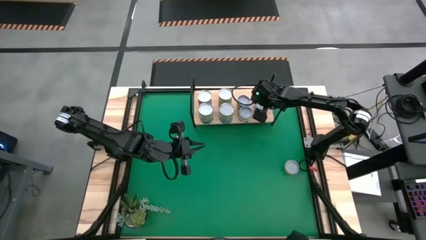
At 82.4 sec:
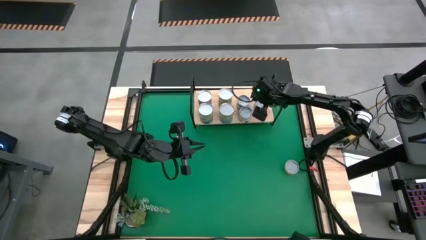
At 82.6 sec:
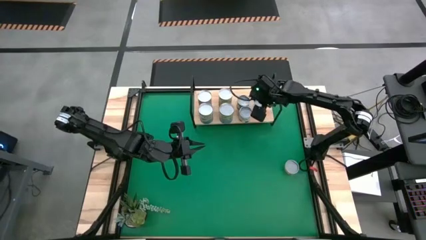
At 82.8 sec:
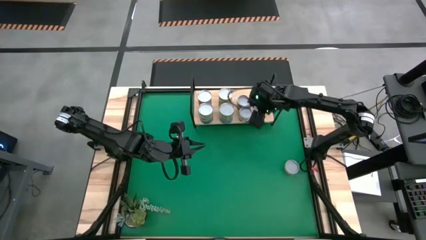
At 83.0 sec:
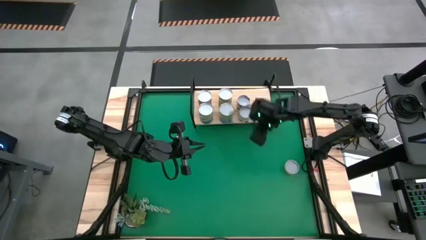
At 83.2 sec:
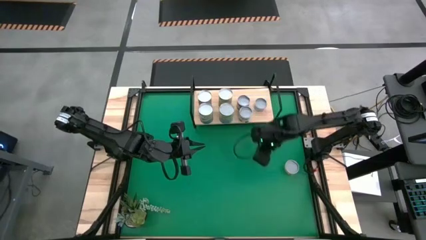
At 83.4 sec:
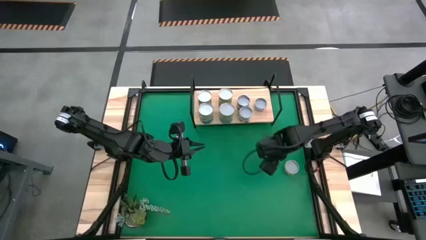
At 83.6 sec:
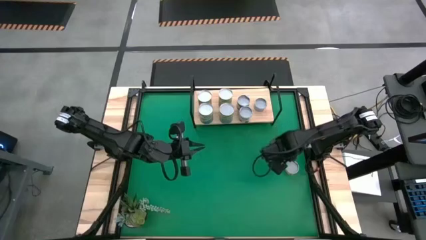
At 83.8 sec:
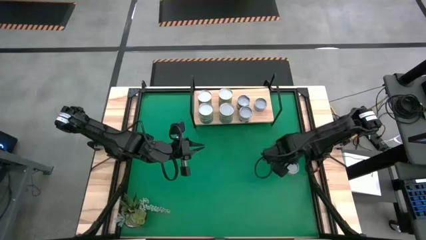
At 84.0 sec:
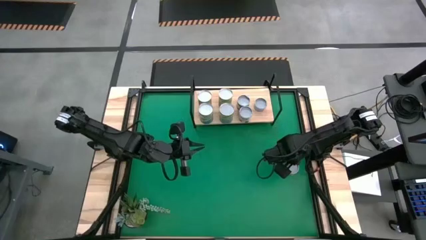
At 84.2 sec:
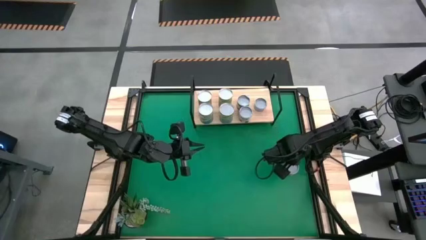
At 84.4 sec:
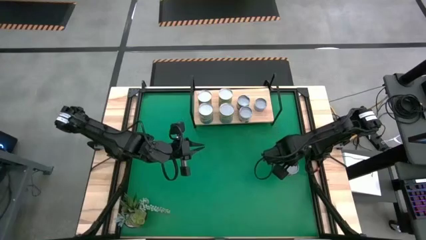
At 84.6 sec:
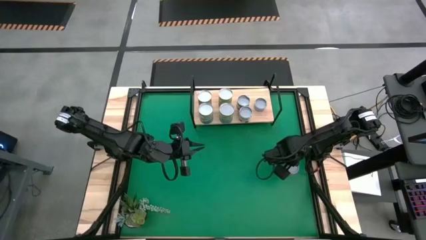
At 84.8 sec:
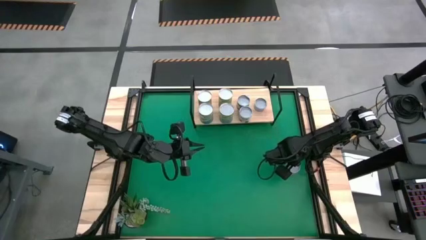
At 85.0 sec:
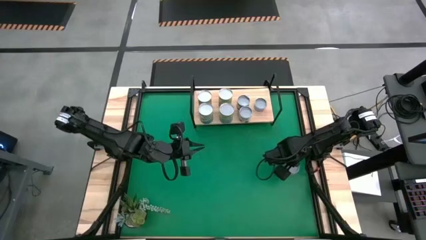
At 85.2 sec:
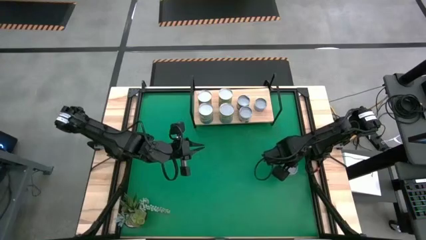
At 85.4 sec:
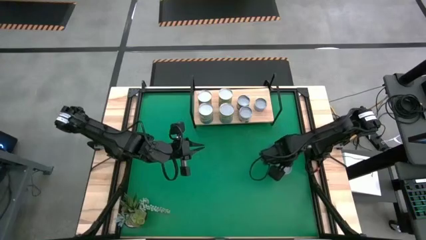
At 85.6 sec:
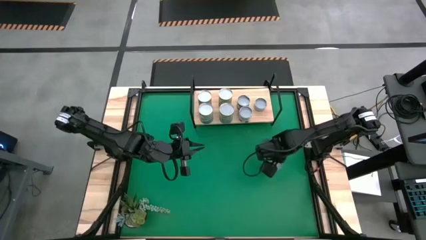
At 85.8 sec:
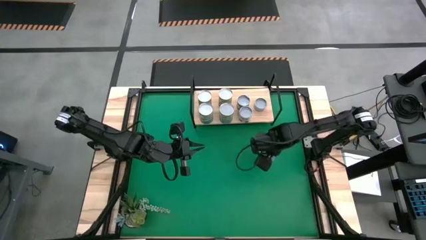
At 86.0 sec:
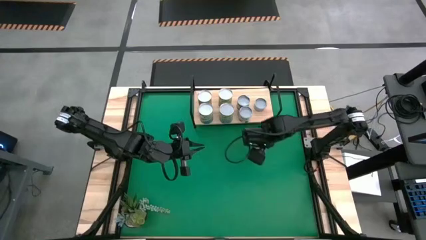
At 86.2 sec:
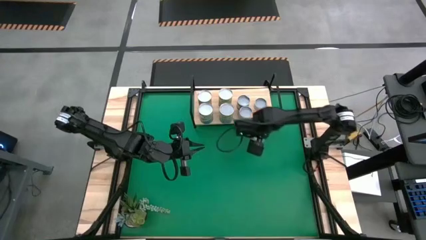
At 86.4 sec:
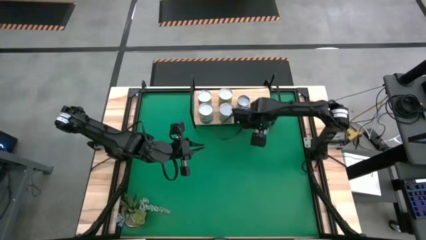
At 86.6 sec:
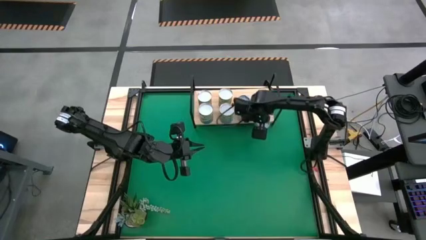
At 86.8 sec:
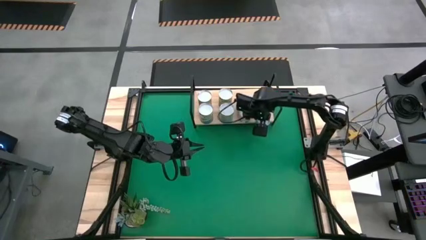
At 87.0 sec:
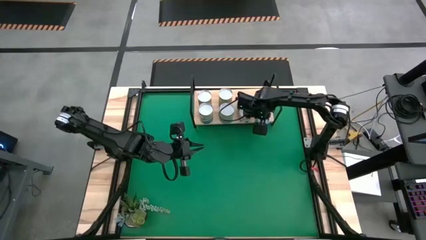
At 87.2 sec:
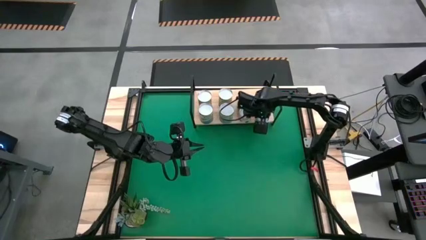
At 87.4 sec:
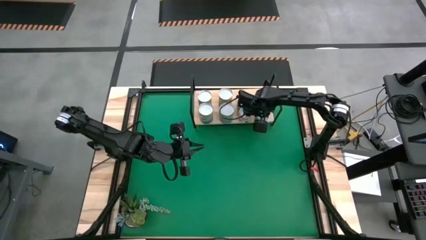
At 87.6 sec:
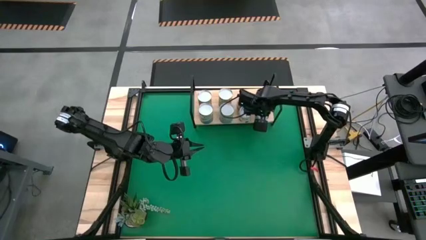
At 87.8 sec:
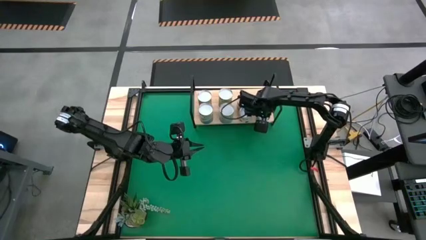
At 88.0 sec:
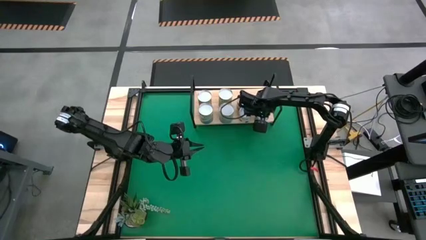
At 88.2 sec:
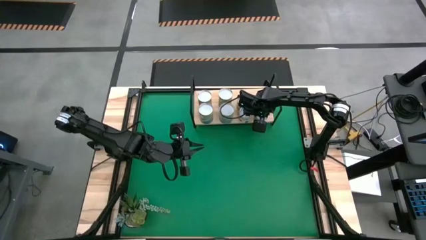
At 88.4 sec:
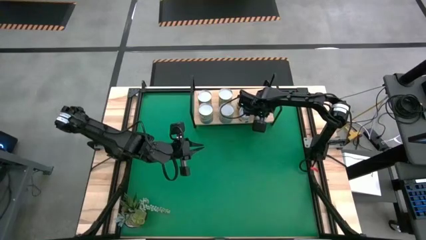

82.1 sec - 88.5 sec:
Task: Pick and place cans onto a shelf
Put the canned mangos on the shelf

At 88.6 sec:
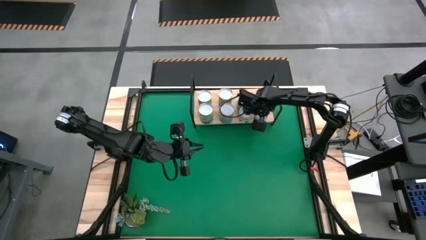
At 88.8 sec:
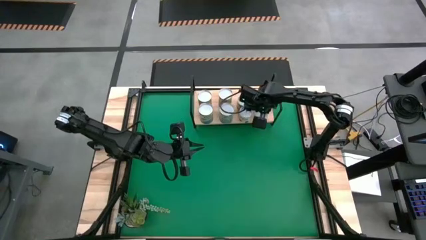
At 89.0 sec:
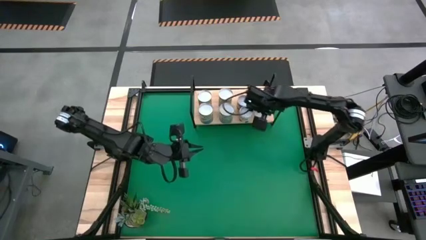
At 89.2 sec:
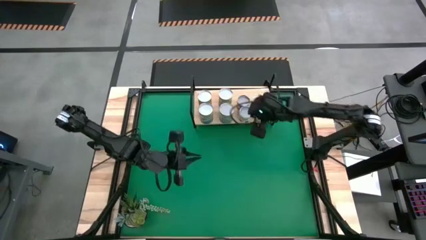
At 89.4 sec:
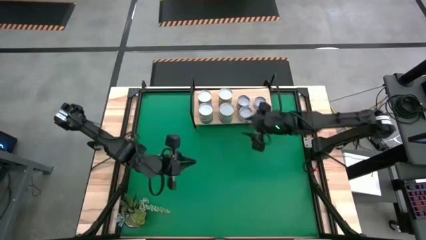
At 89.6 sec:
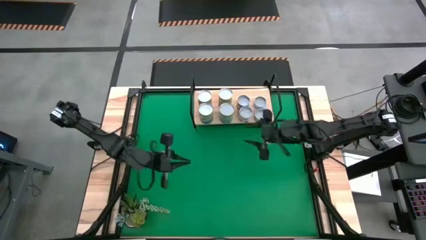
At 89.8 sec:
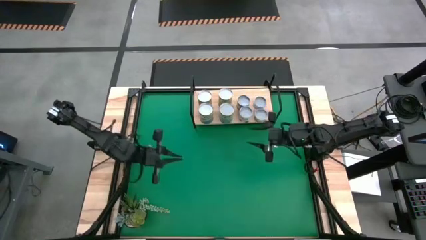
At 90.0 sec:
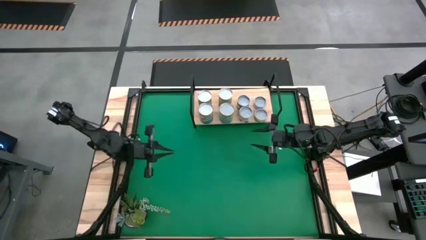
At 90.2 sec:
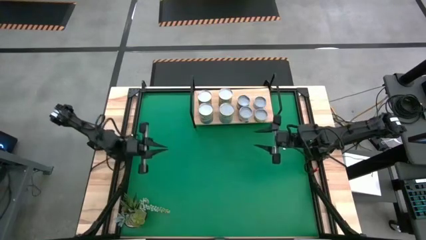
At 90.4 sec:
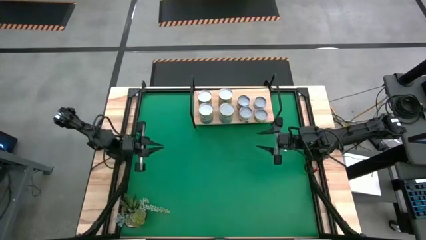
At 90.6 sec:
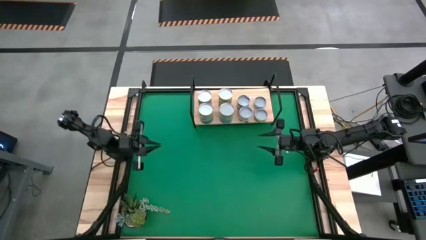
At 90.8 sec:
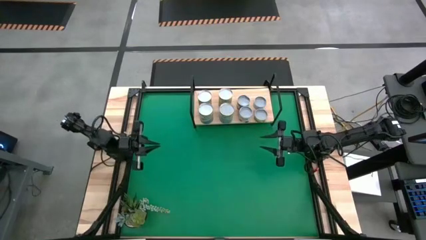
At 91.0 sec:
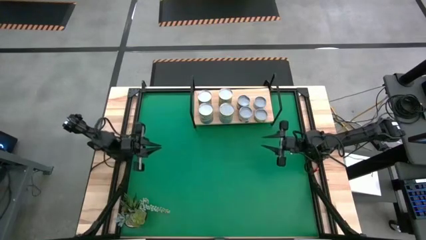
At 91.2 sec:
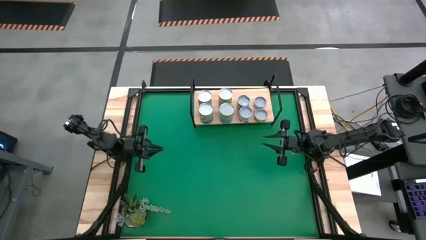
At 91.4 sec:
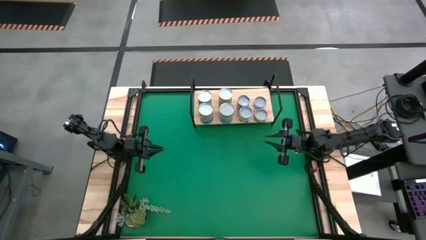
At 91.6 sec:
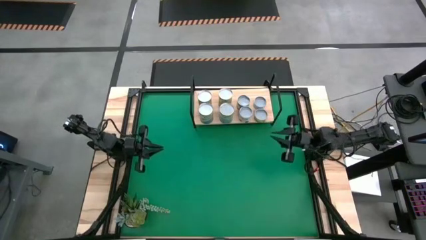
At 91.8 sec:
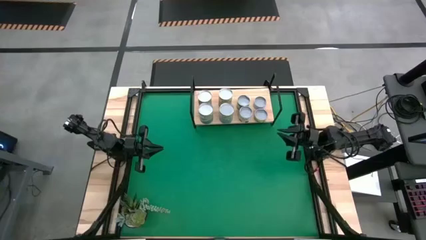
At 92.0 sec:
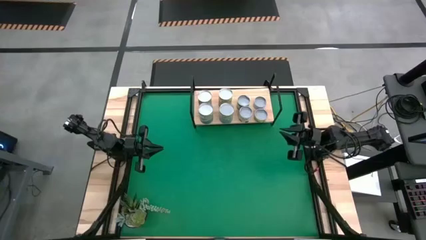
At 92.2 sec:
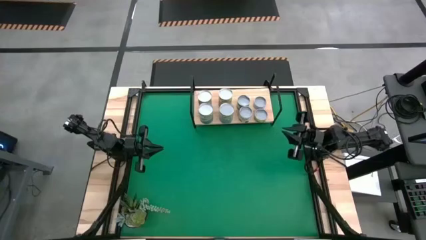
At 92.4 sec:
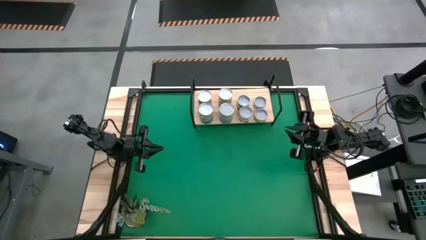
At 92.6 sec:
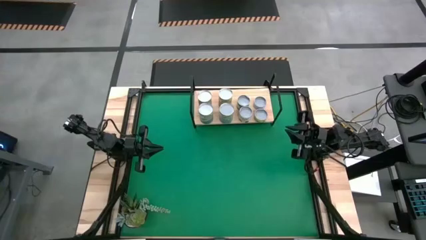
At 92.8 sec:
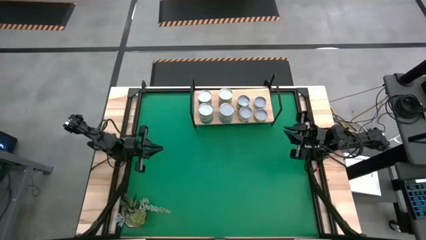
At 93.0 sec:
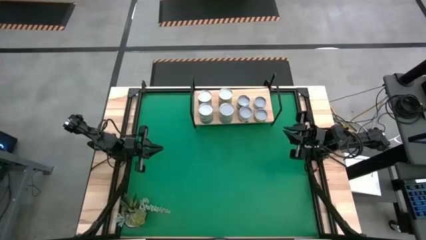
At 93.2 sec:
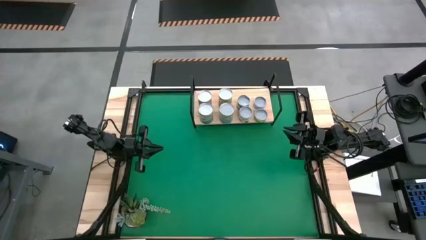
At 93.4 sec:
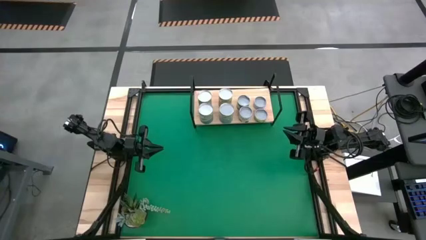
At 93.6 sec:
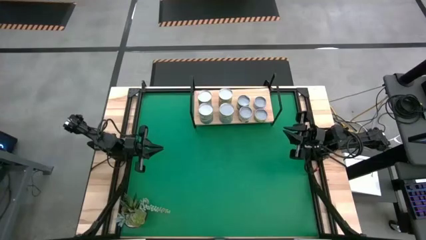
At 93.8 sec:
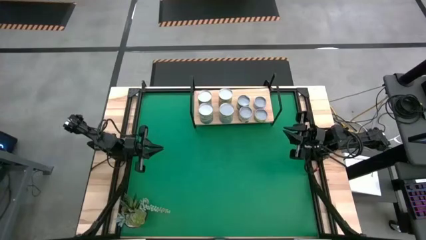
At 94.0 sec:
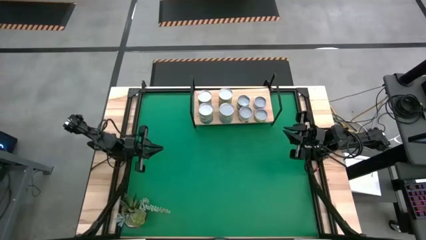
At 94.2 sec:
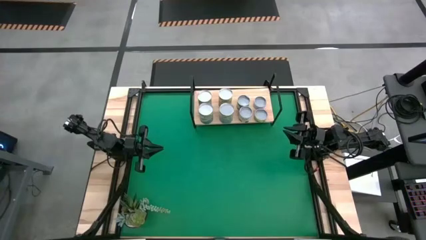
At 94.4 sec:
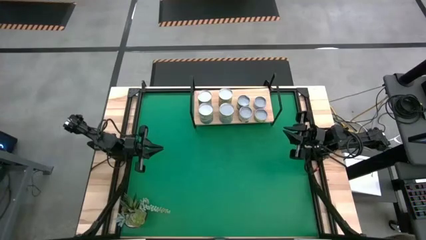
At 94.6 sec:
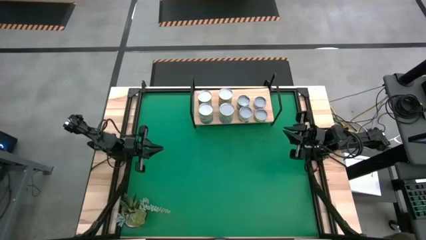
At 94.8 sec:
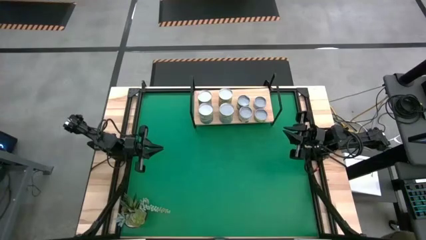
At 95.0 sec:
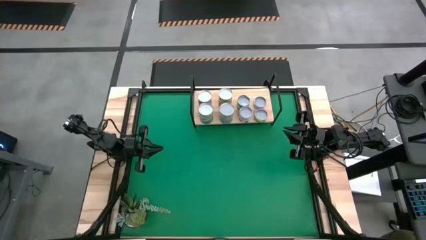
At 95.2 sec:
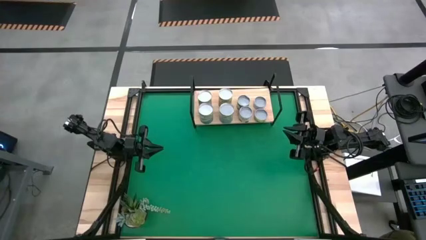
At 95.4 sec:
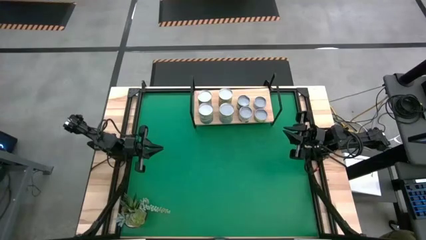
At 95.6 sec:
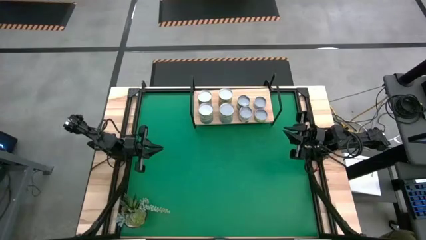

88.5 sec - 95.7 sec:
Return to Home Position

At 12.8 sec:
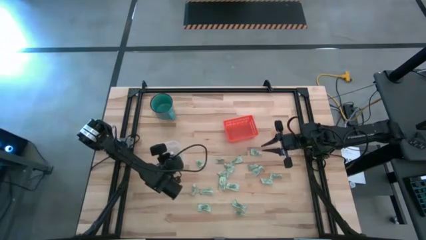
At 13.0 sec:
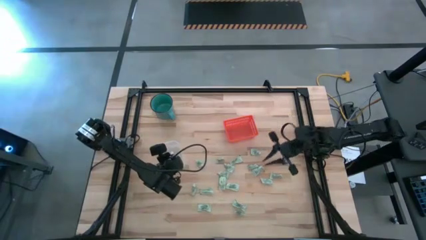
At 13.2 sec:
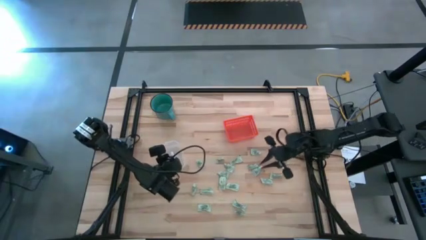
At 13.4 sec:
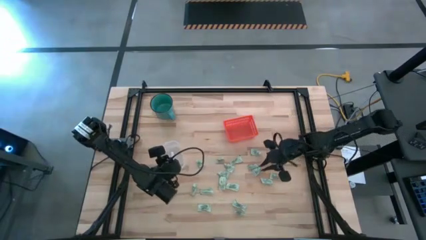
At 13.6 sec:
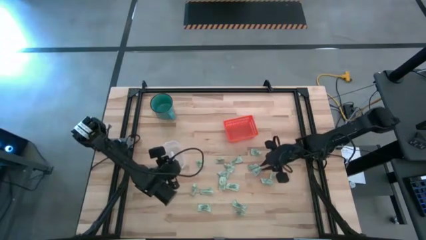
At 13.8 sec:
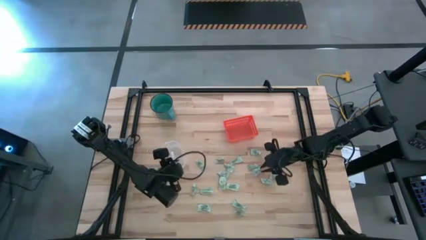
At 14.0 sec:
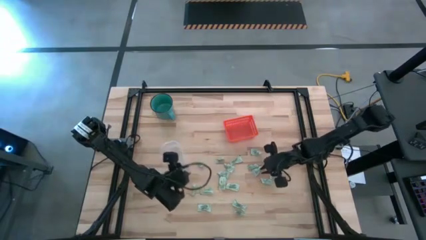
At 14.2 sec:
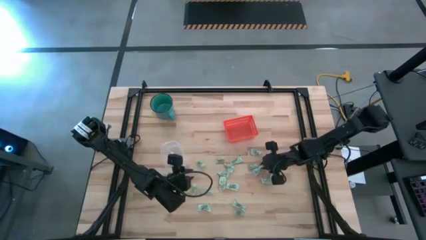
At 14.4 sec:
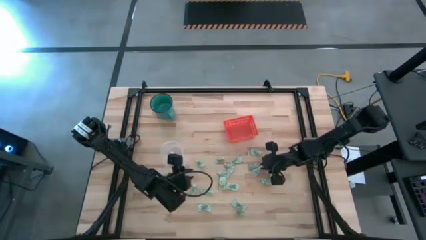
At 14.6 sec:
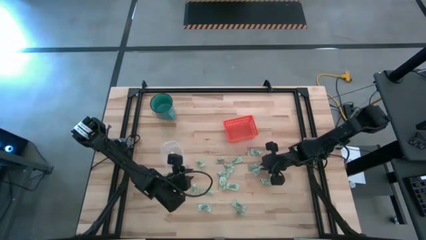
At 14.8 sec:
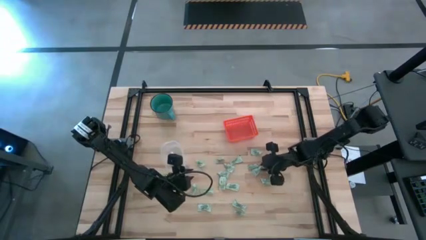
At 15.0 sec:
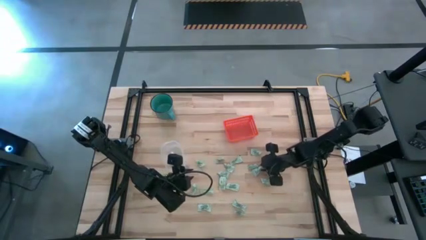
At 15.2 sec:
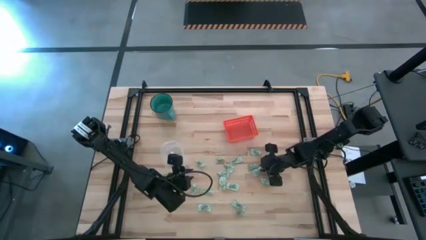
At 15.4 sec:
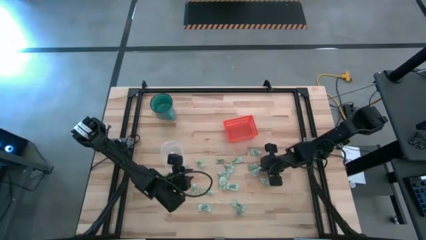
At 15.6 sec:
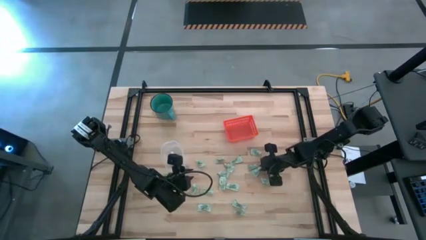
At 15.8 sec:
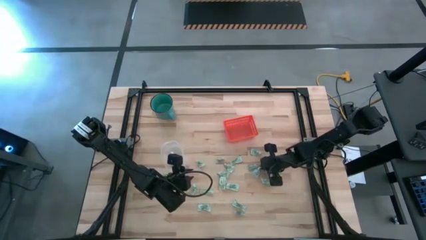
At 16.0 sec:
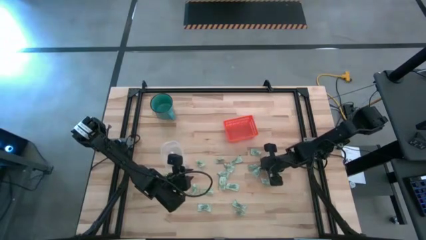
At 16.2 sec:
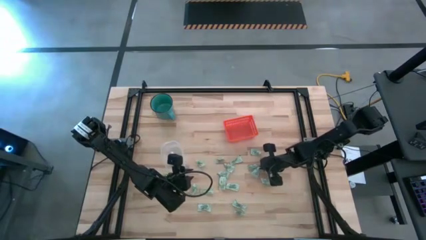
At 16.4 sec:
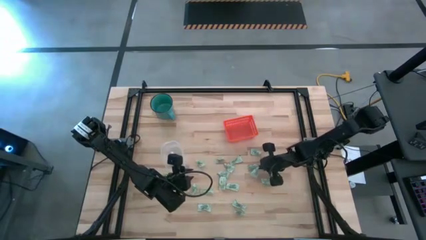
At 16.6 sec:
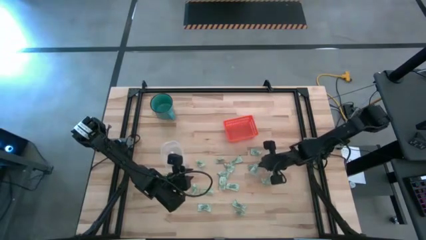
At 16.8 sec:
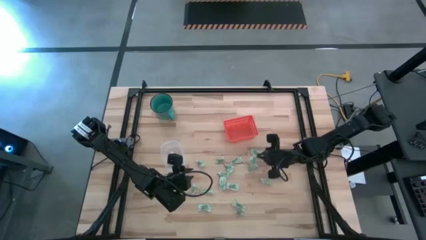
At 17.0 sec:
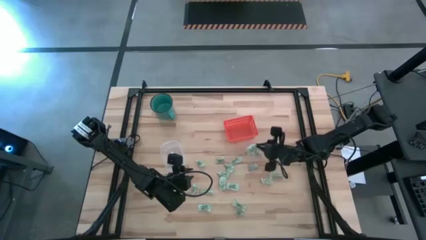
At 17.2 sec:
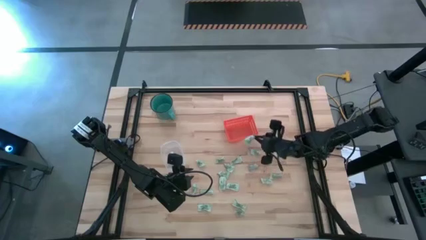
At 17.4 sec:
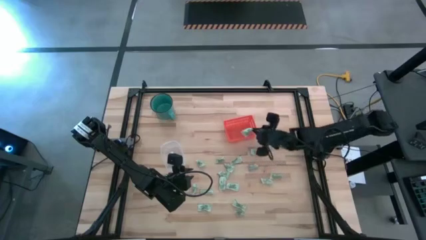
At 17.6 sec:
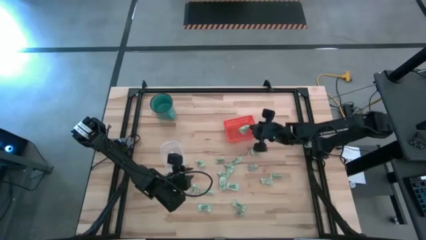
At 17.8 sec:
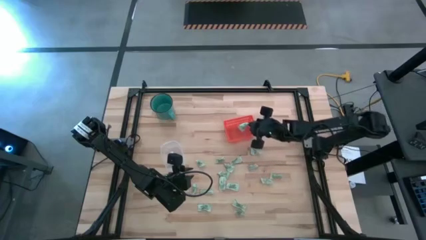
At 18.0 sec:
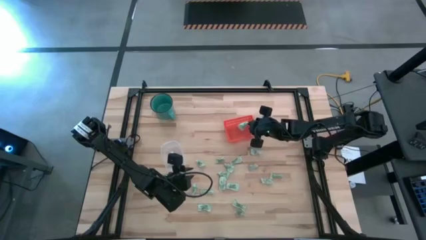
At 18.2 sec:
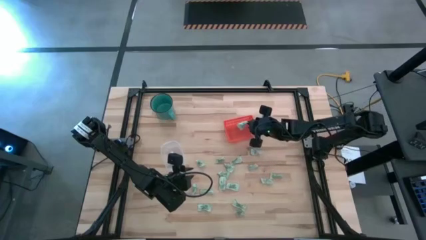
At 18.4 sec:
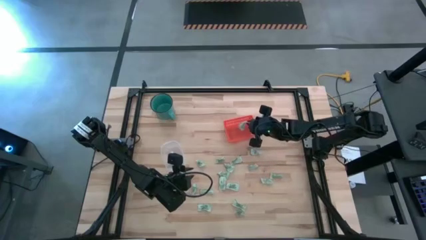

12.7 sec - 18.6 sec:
Task: Pick and place items into bin
Put the light green stevia packet into the orange bin
